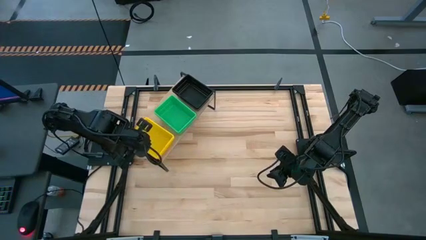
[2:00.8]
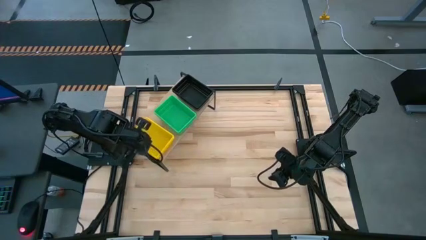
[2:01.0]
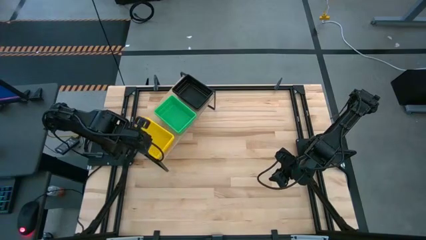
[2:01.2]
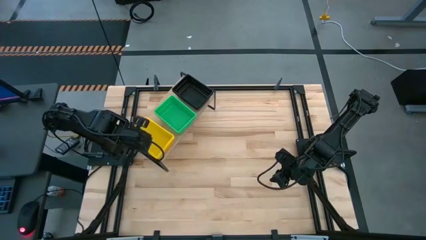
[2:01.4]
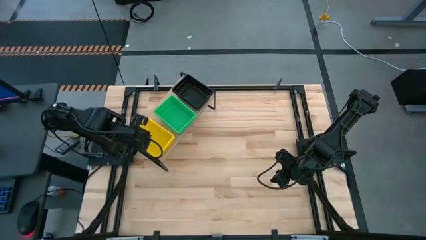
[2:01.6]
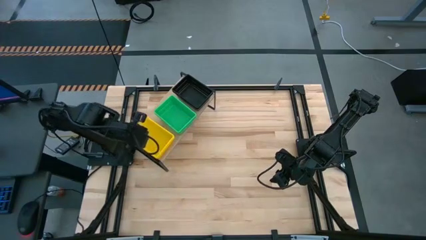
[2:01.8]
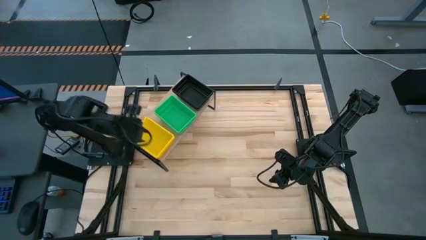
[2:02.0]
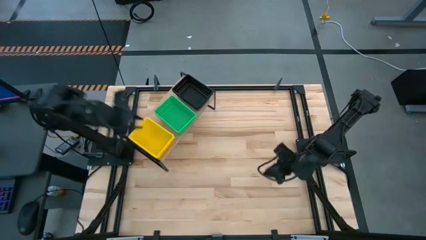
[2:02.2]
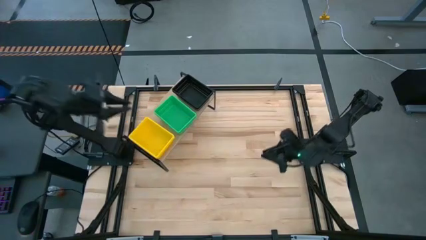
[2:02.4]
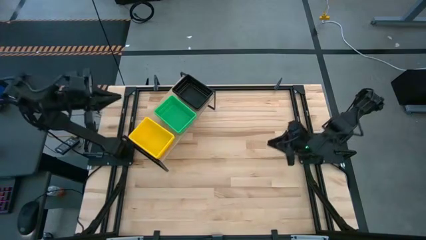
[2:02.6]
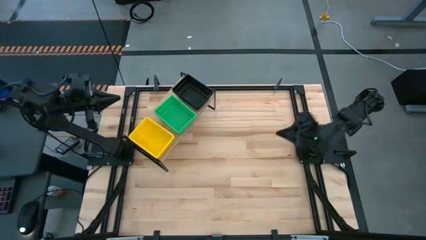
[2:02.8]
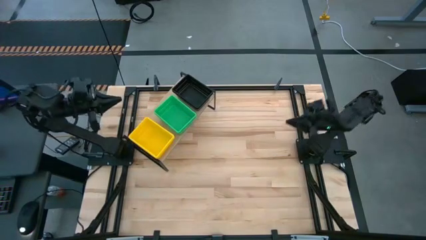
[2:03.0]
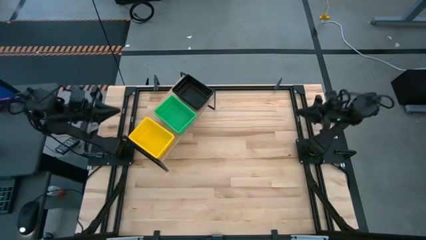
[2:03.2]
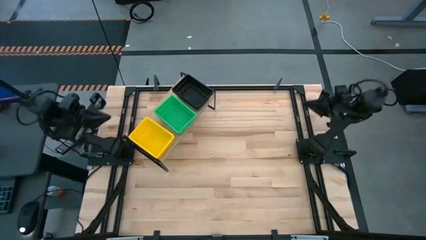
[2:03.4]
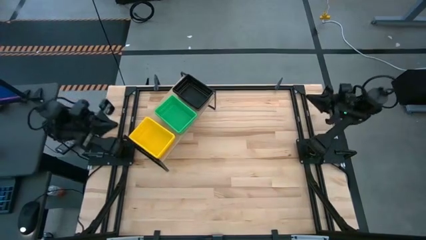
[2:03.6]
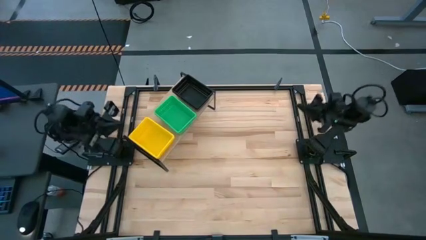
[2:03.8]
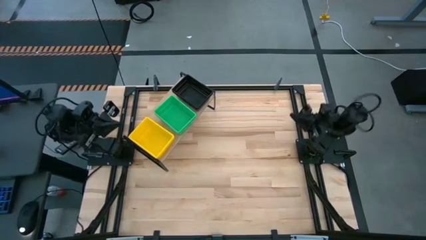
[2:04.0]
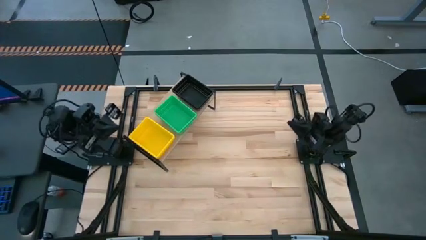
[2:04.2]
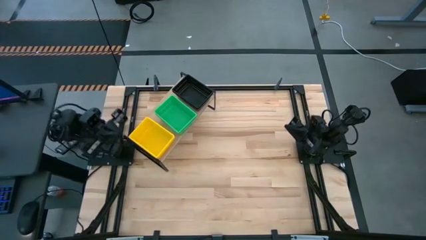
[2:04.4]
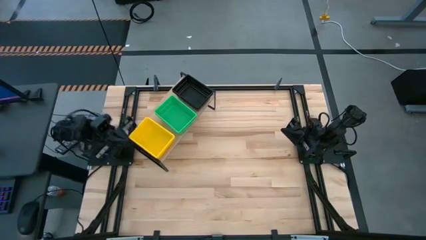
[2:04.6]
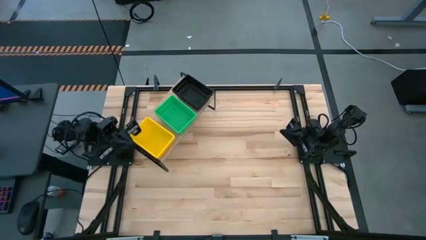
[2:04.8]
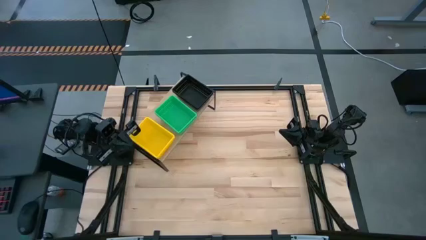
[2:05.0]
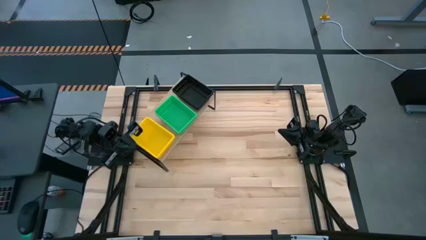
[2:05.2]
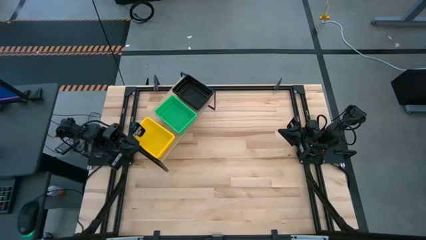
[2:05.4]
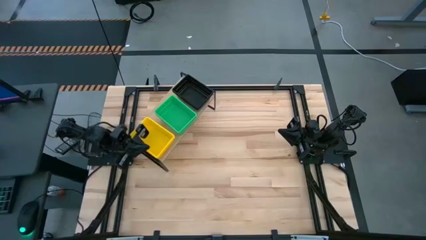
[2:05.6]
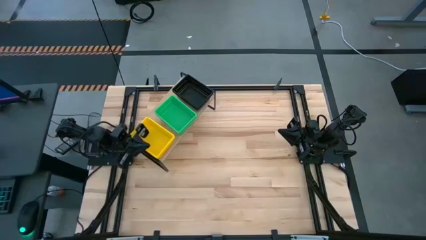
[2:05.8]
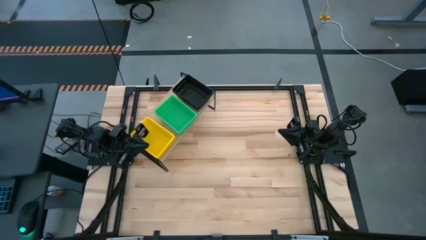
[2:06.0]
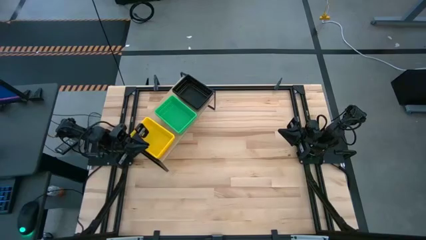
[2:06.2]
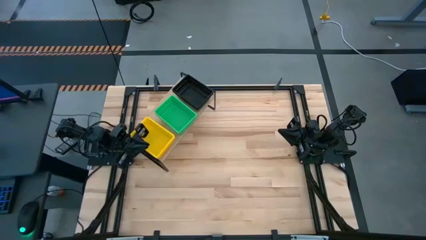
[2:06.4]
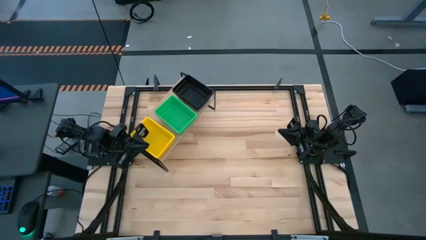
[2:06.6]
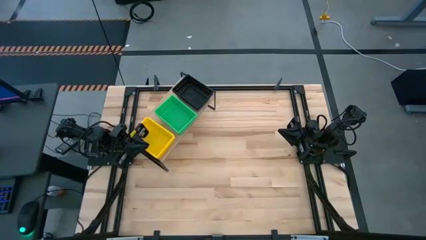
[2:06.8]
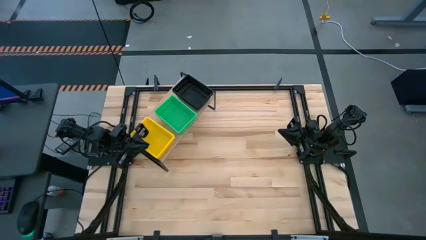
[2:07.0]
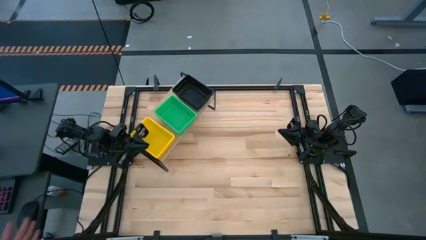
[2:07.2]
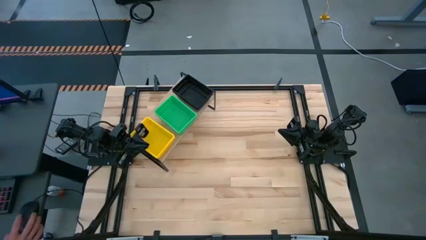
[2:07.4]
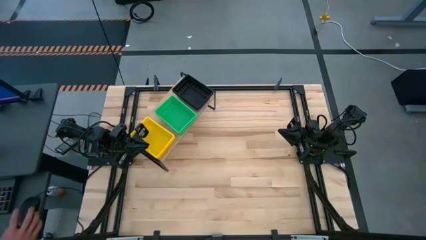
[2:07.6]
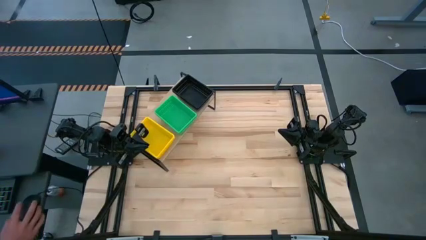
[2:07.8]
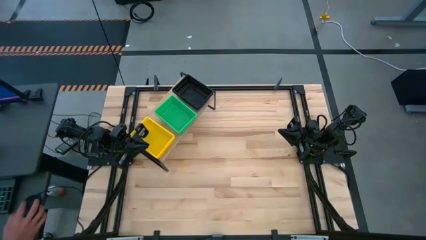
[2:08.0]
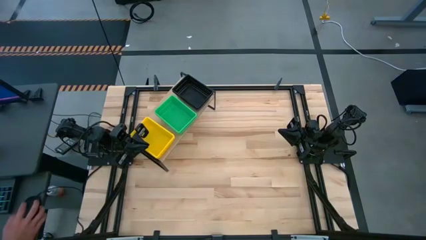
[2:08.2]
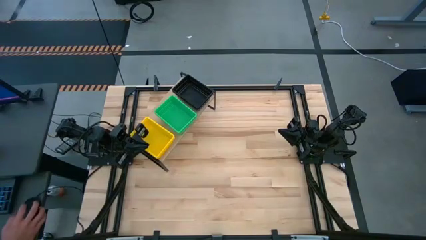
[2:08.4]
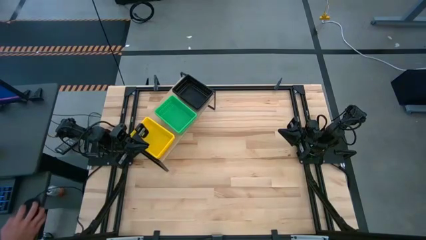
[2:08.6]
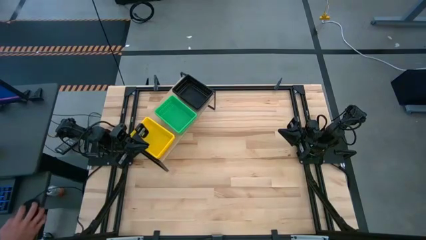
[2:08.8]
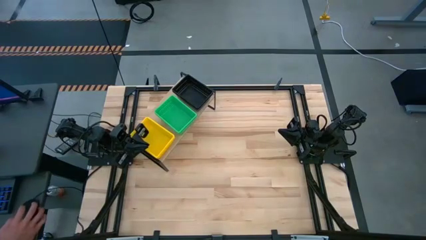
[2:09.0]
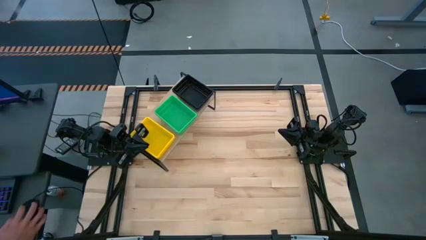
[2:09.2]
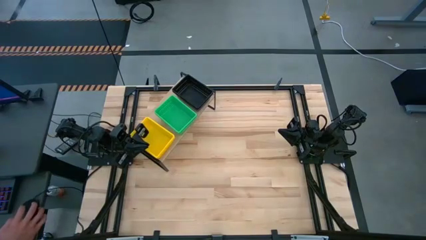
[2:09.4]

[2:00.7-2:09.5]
Task: Stack baskets on shelf by color
Return to Home Position

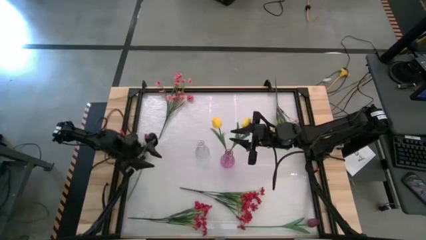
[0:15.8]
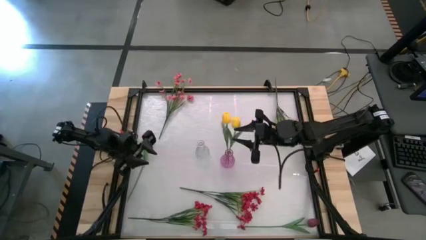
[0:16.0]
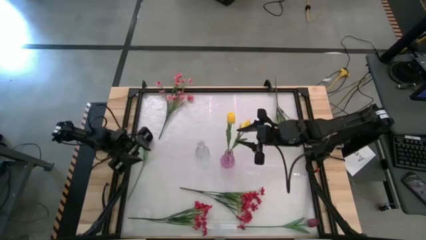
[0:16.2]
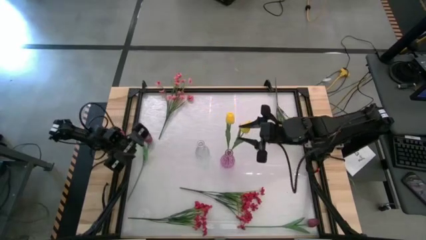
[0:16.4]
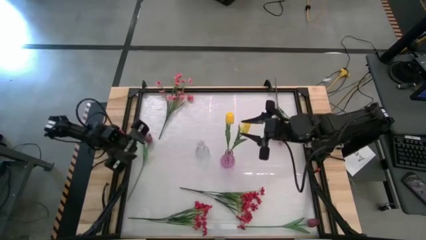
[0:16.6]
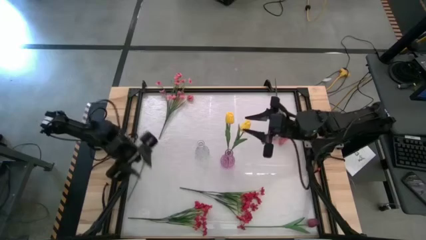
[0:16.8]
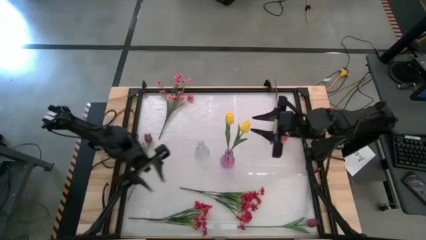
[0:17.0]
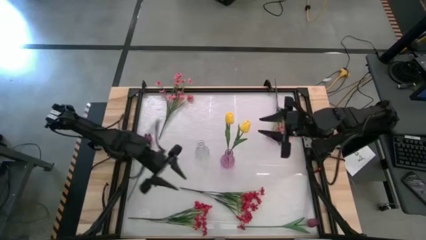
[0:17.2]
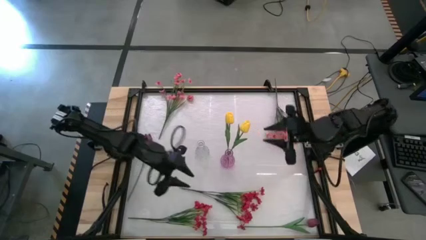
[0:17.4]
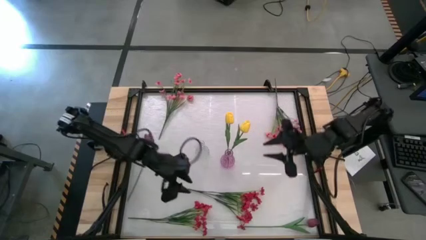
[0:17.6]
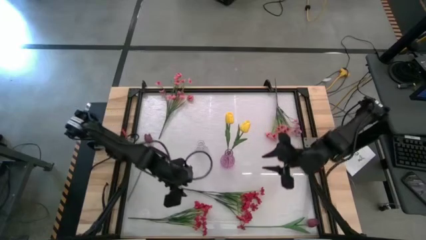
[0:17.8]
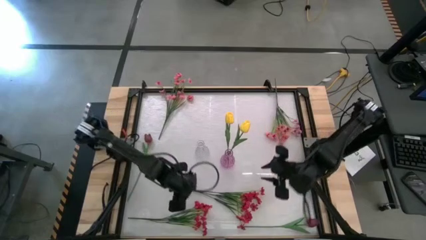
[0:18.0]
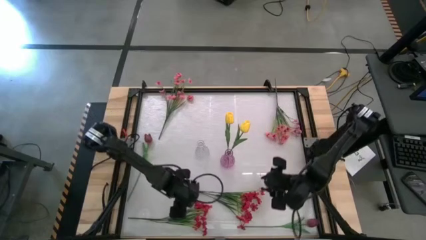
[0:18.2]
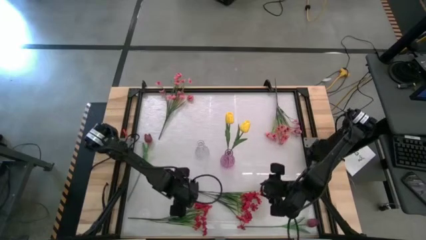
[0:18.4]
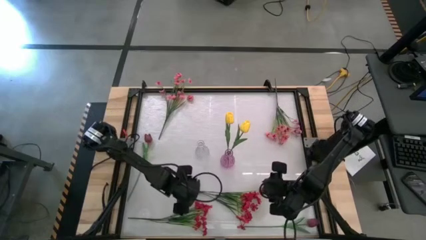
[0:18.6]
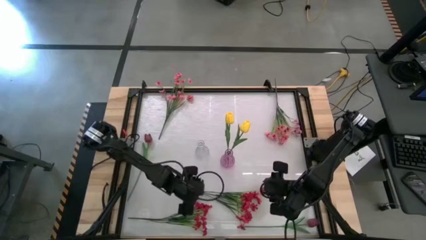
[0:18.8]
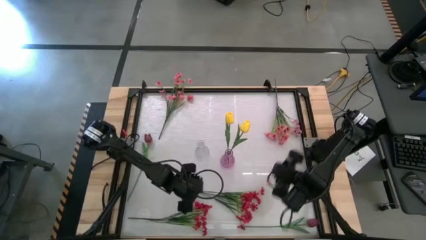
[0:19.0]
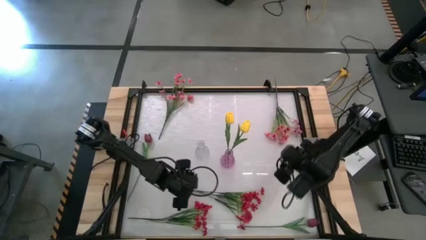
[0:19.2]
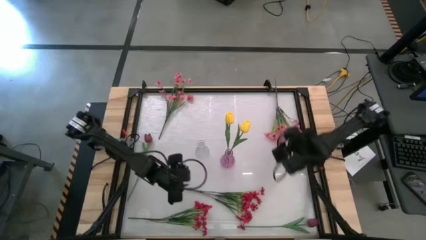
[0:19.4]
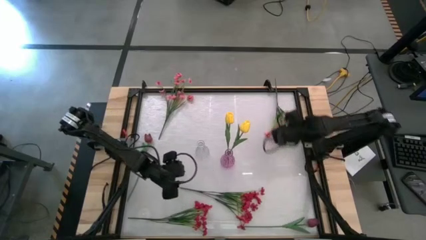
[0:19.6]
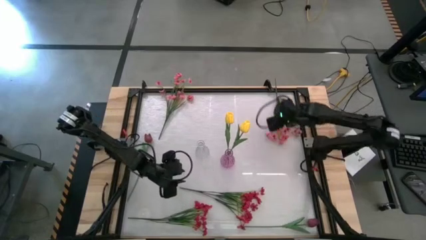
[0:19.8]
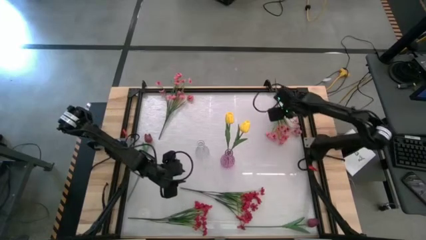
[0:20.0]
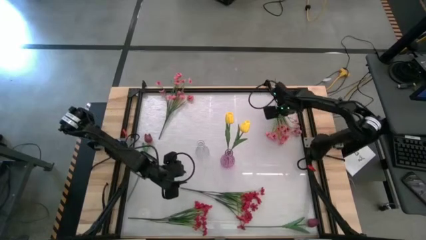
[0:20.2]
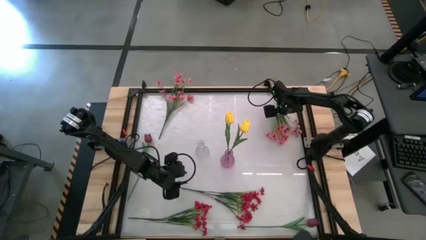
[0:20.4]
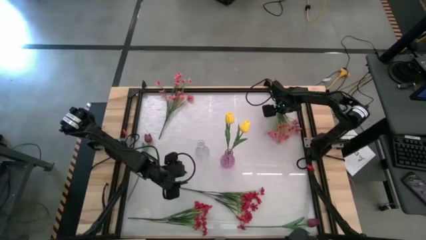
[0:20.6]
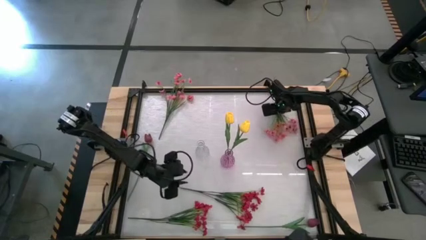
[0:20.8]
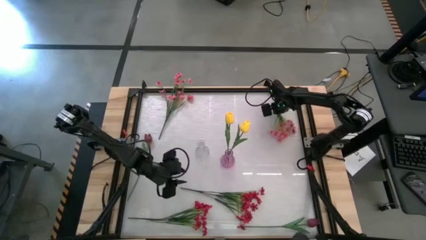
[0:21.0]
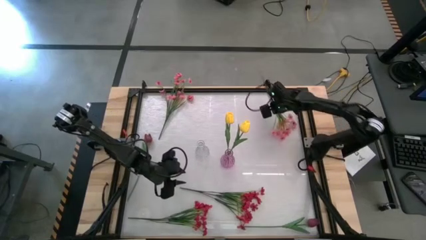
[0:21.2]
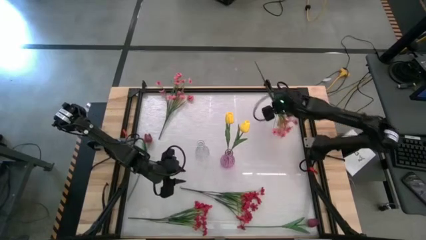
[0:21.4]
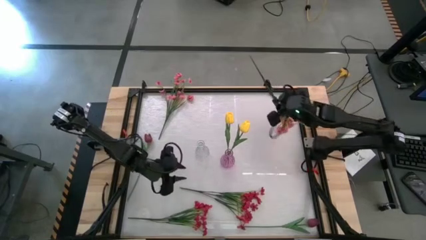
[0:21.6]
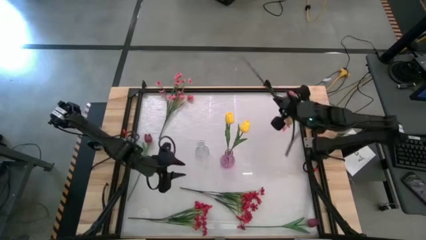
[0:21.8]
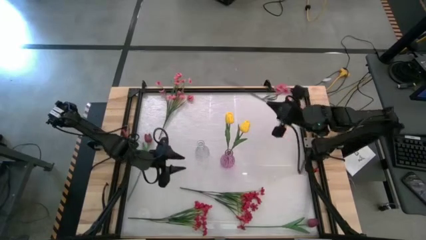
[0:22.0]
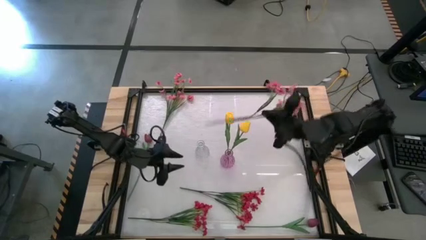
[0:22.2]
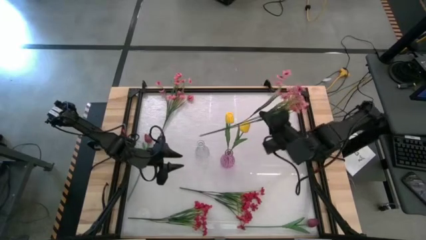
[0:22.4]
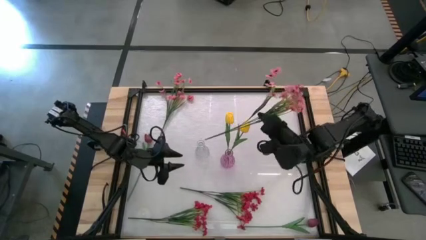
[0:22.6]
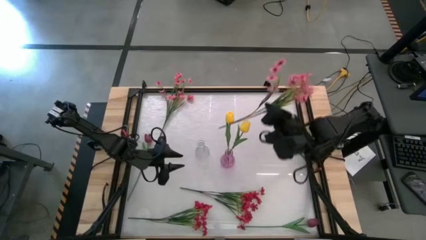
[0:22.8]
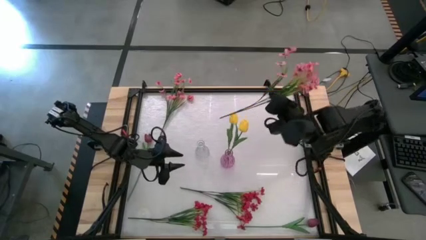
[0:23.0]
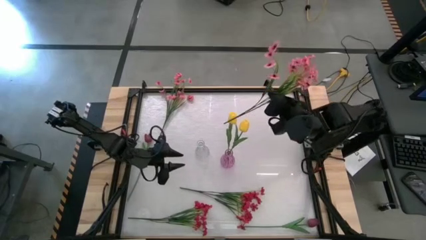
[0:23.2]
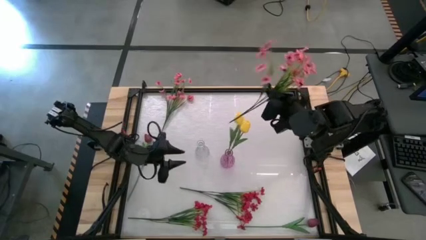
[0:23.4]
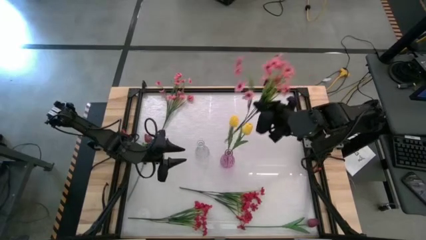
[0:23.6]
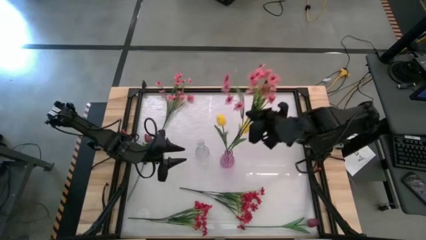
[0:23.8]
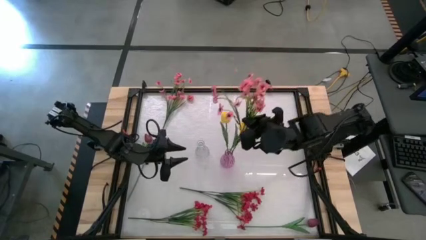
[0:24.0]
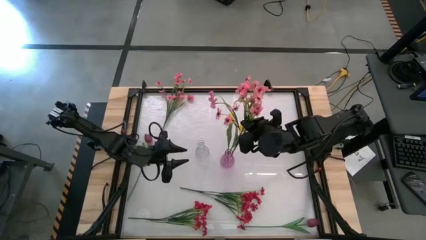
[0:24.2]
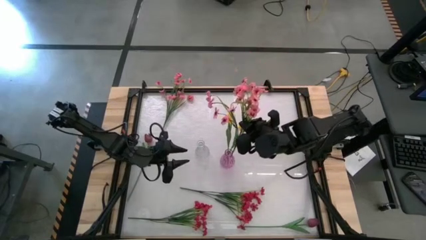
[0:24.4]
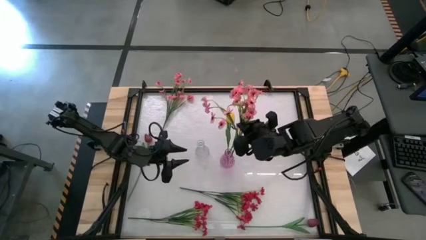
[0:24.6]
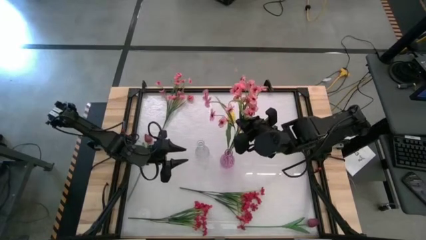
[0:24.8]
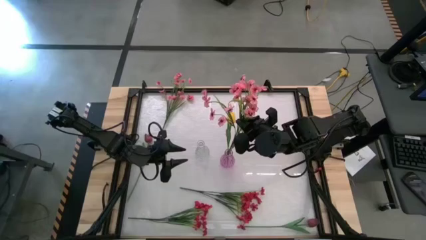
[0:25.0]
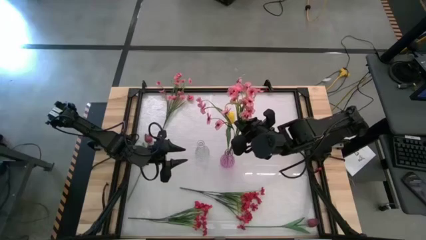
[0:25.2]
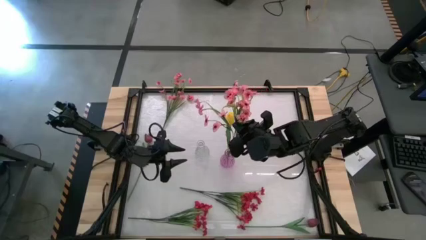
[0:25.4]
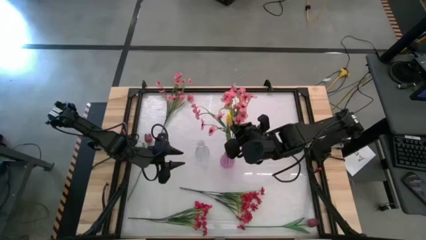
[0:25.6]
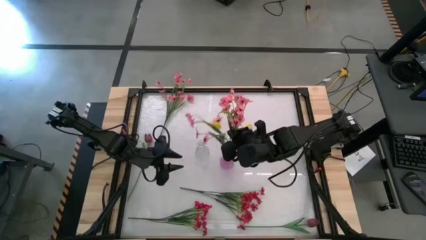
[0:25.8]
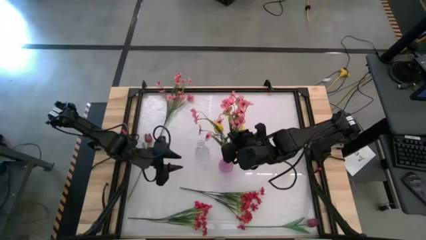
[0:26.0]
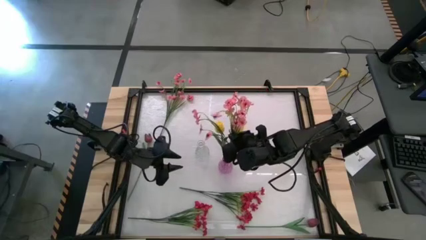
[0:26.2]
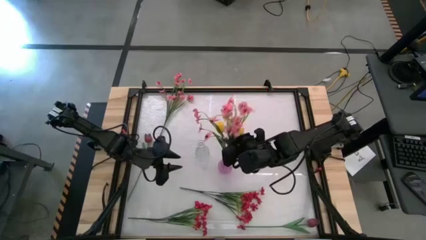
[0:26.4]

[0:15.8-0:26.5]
Task: Sort flowers into vase by color
Put the right pink flowers into the purple vase
